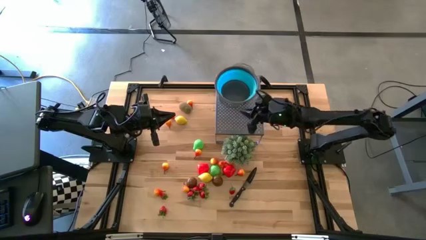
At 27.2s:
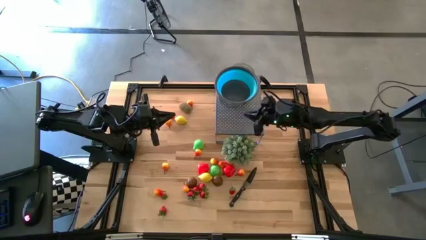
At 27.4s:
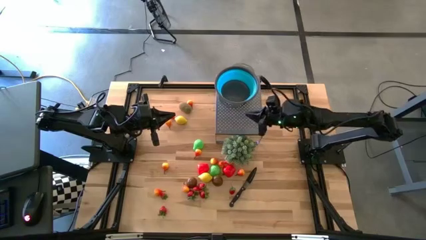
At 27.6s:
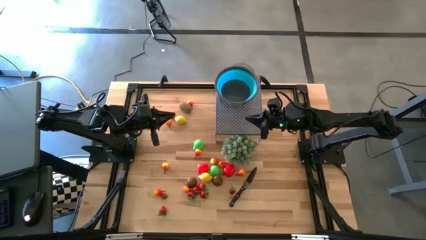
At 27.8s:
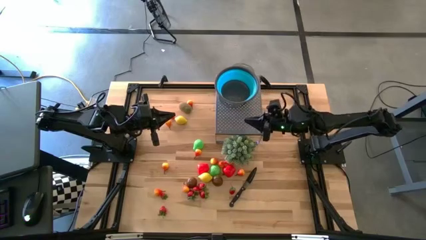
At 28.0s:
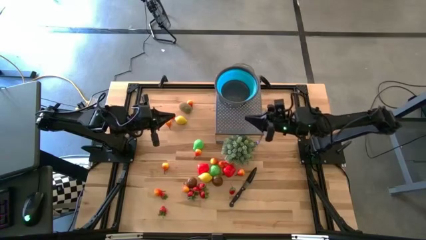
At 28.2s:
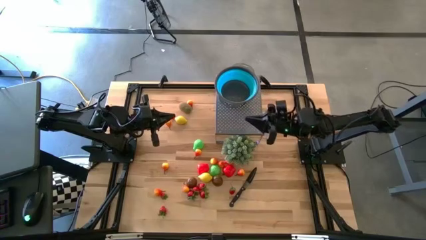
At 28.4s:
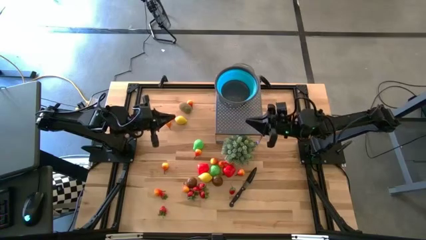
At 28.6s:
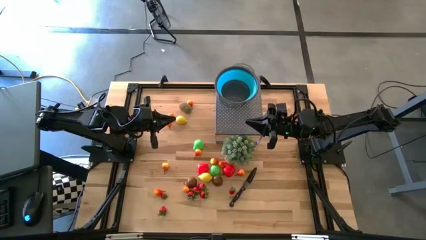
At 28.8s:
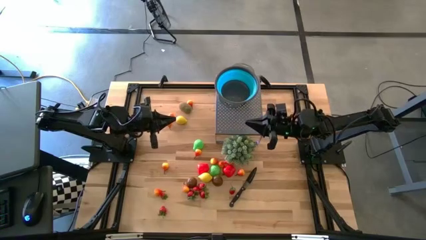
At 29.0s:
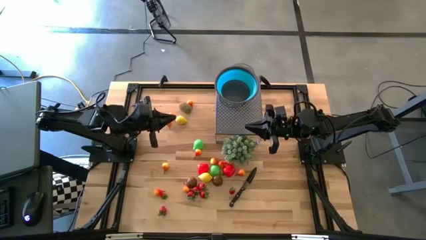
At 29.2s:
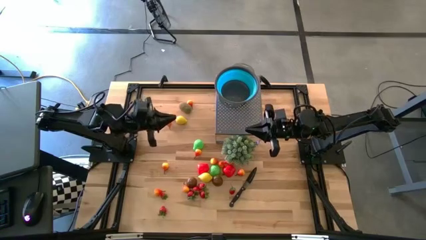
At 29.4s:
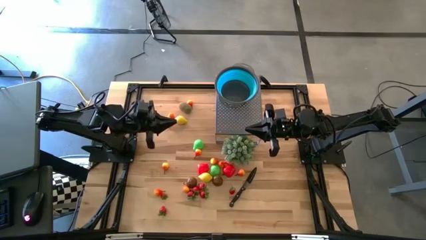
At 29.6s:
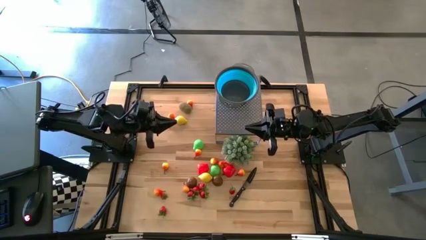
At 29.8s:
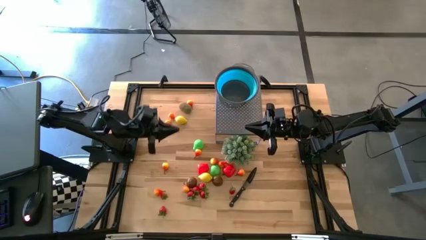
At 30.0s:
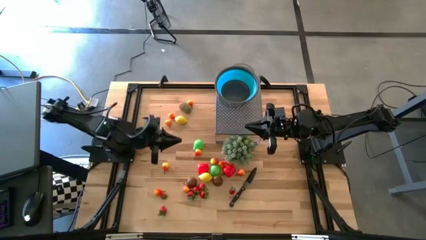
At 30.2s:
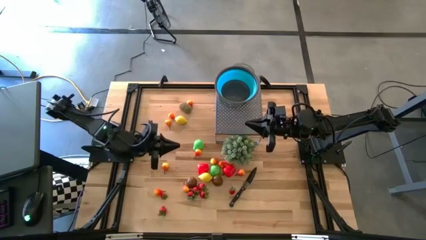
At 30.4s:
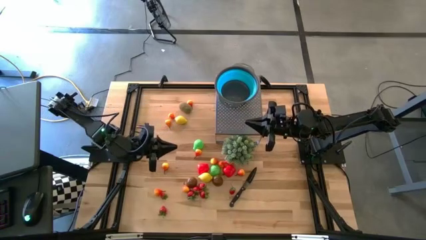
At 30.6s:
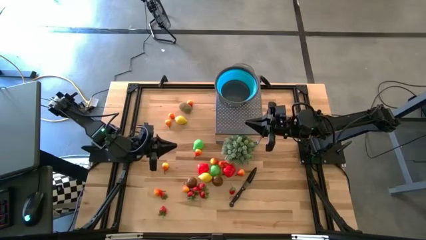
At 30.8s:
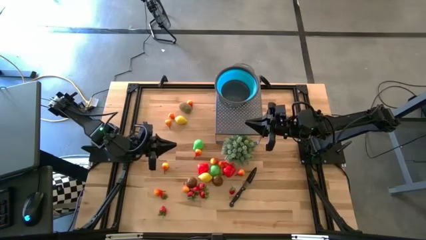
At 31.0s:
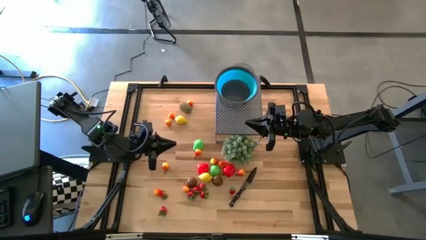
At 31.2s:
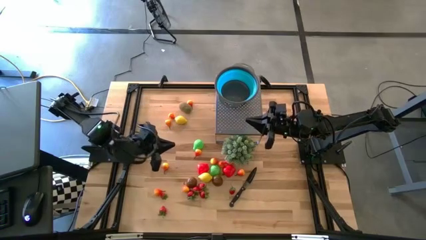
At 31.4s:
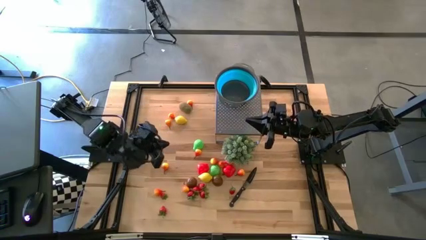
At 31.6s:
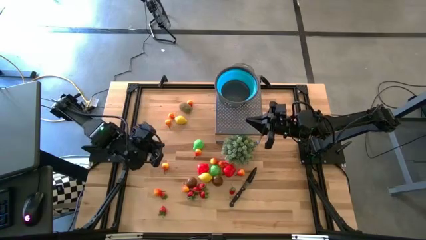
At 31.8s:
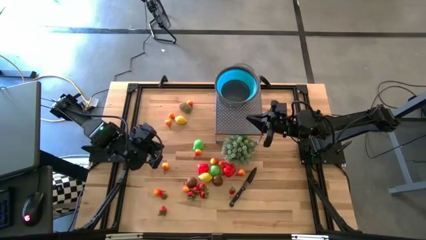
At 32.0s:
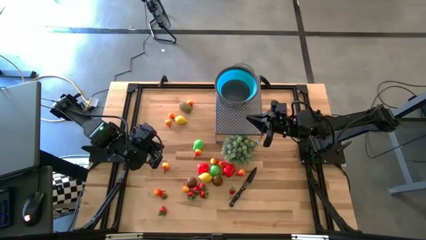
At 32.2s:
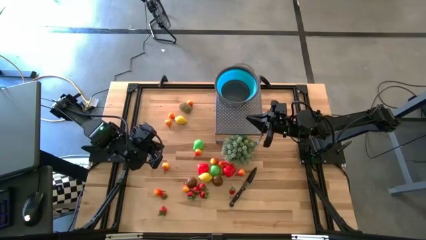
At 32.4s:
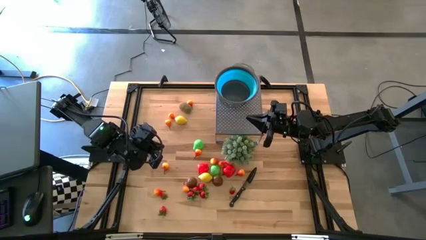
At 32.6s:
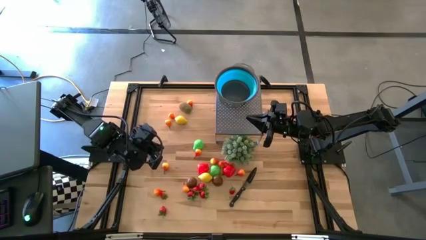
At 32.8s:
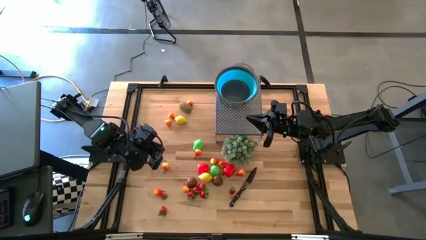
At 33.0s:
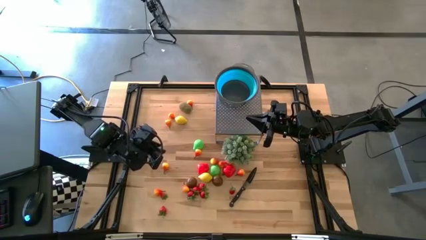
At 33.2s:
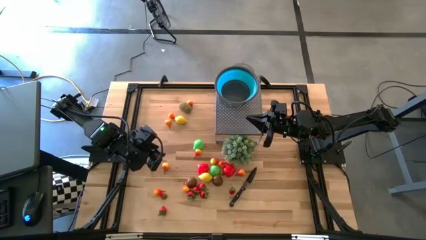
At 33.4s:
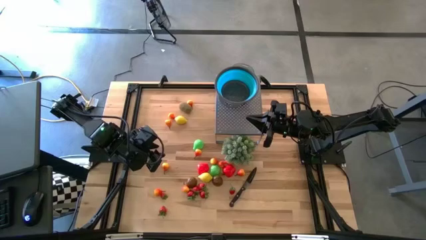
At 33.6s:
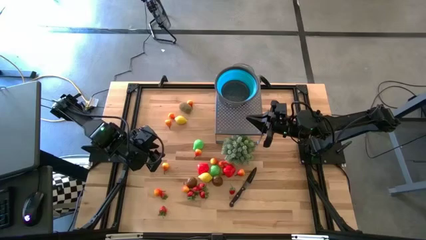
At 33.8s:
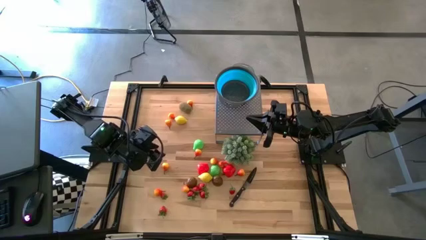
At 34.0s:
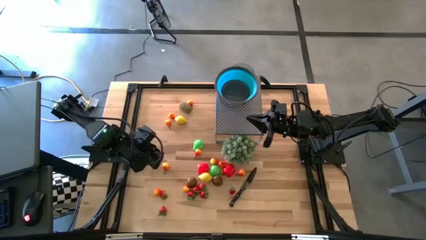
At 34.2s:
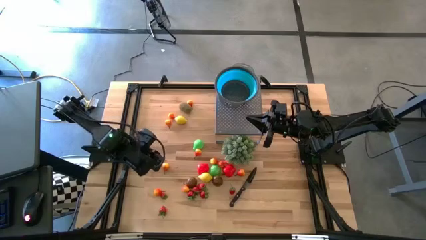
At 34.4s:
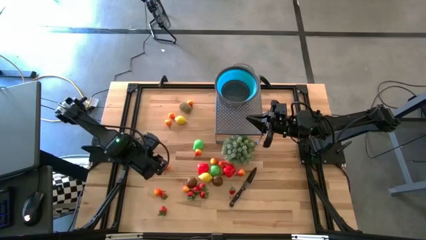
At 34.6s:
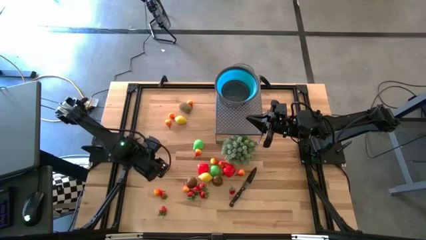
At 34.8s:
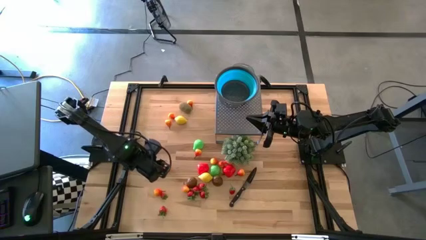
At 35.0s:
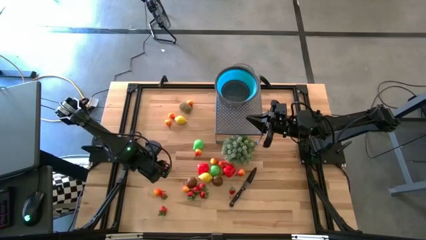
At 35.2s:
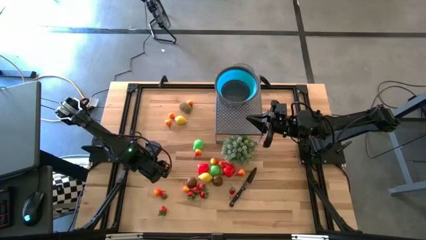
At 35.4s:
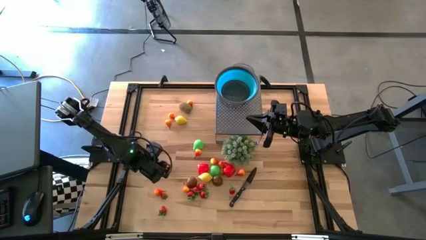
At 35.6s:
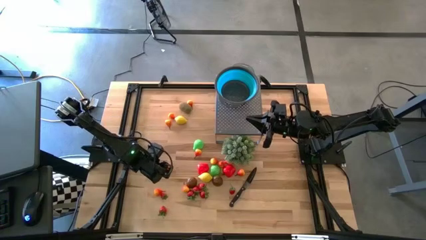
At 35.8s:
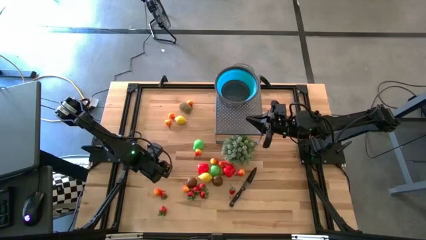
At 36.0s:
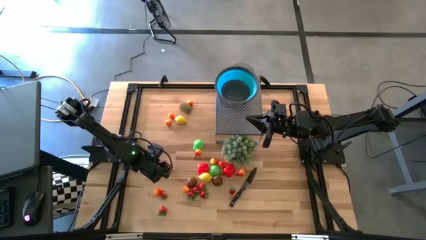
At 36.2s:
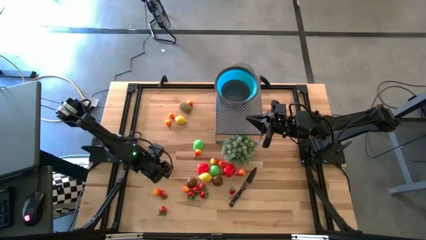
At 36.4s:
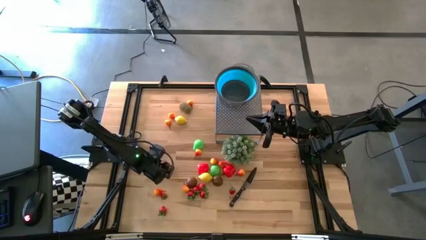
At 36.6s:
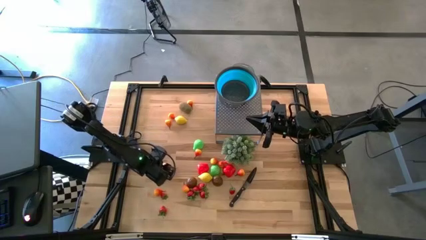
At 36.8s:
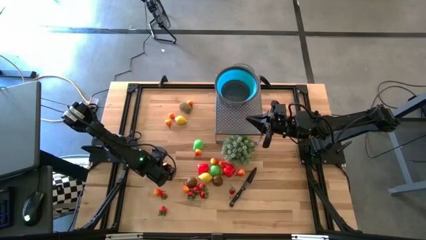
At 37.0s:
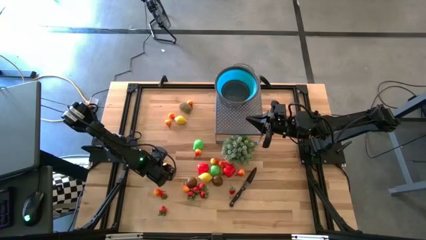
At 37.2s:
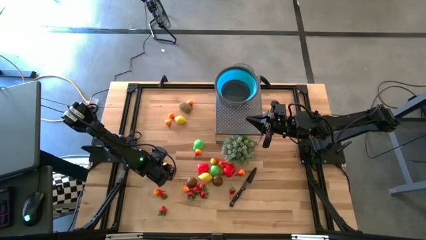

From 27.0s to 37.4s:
Task: Pick & Place Fruit
Put the orange pear into the blue strainer bowl

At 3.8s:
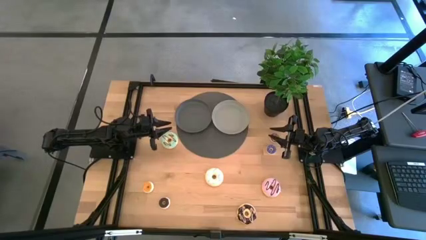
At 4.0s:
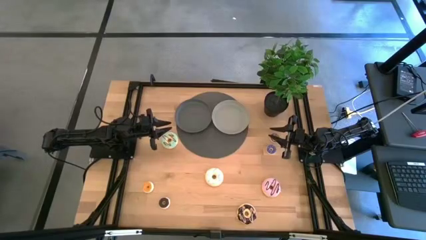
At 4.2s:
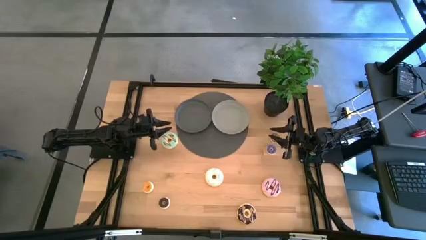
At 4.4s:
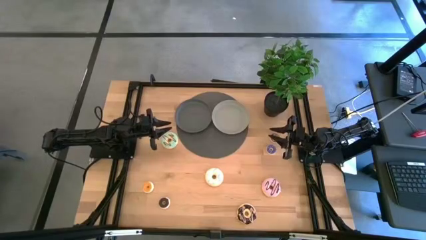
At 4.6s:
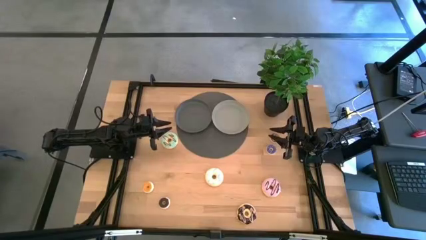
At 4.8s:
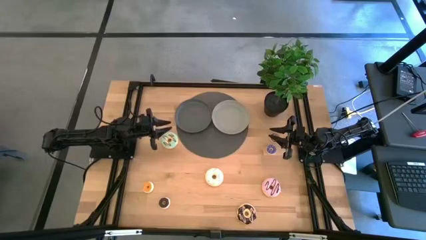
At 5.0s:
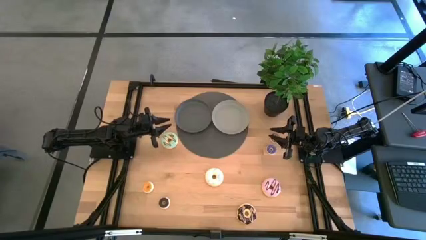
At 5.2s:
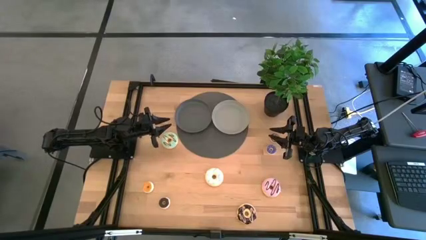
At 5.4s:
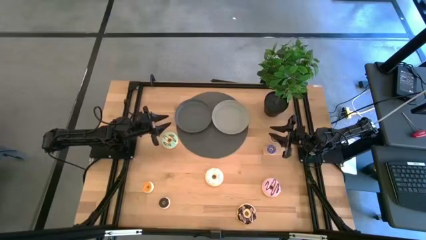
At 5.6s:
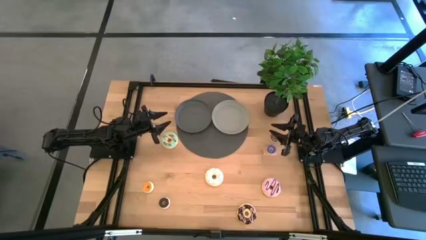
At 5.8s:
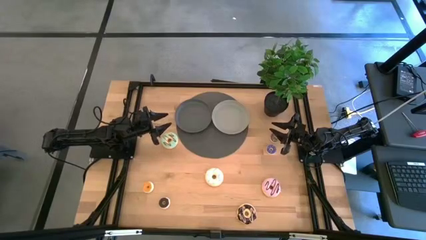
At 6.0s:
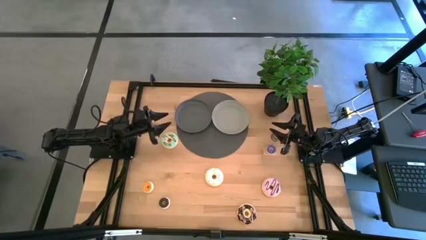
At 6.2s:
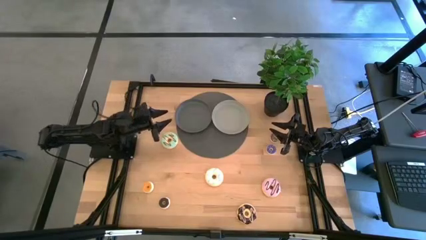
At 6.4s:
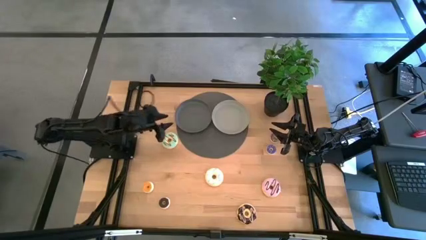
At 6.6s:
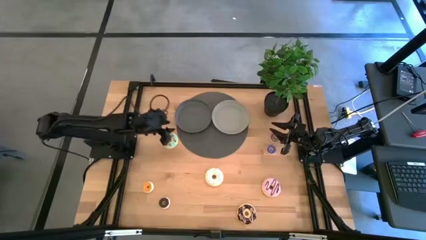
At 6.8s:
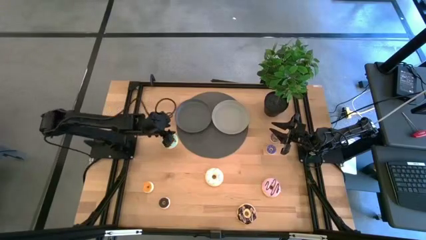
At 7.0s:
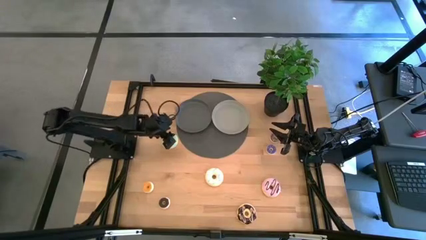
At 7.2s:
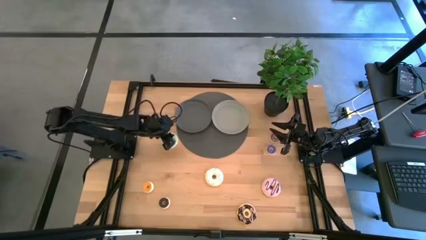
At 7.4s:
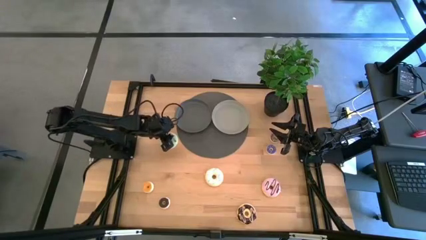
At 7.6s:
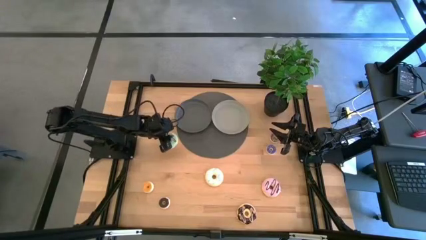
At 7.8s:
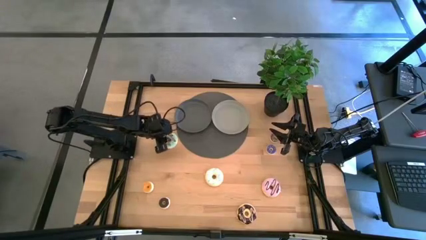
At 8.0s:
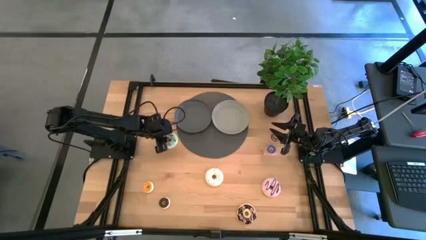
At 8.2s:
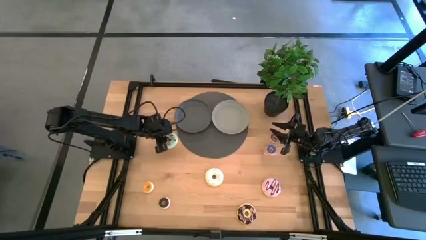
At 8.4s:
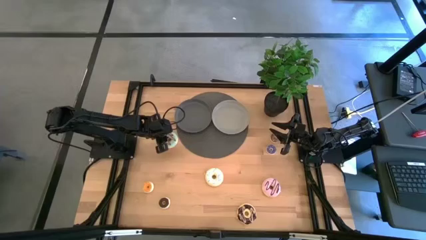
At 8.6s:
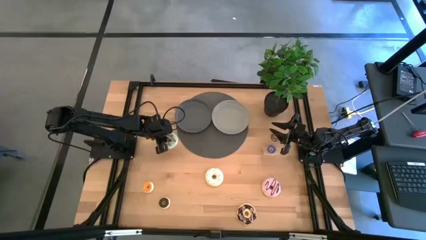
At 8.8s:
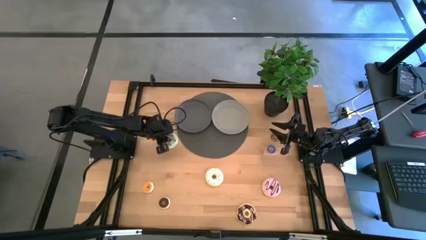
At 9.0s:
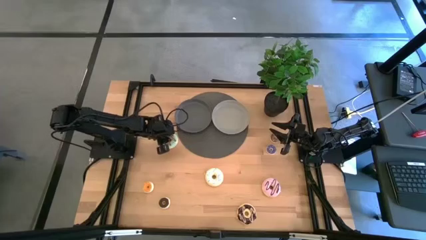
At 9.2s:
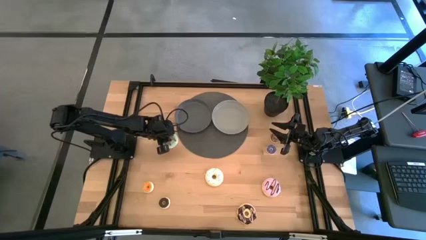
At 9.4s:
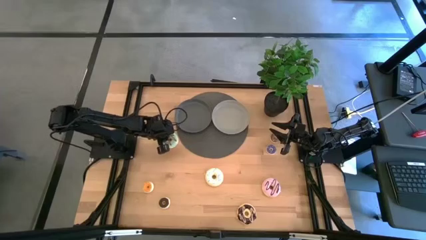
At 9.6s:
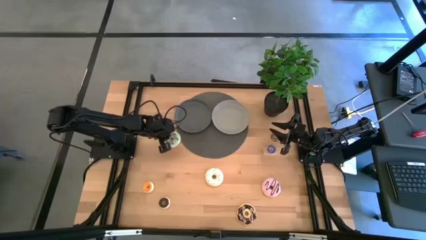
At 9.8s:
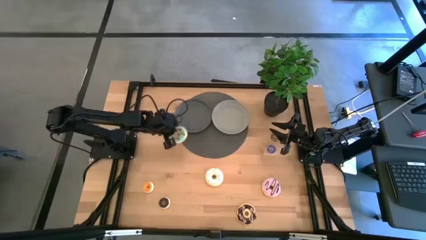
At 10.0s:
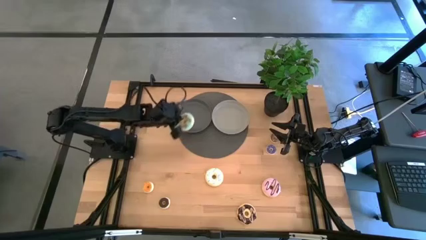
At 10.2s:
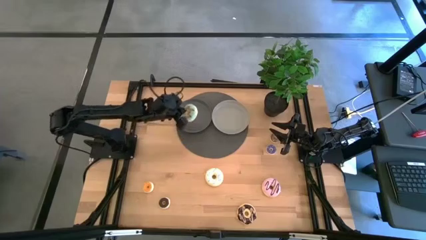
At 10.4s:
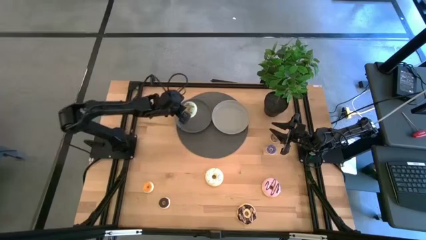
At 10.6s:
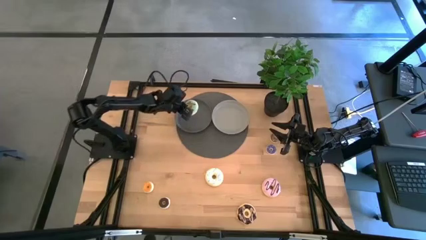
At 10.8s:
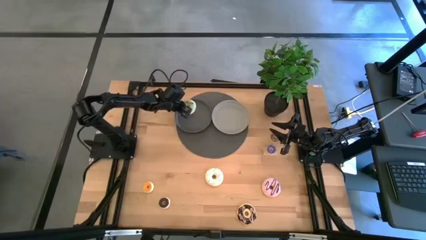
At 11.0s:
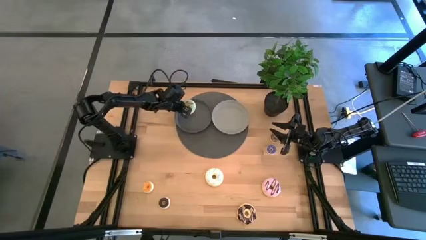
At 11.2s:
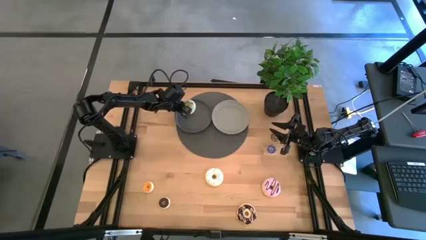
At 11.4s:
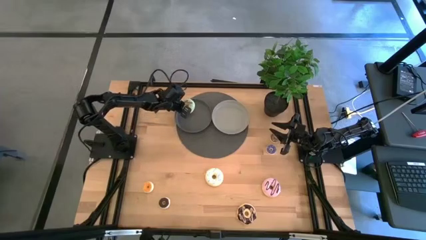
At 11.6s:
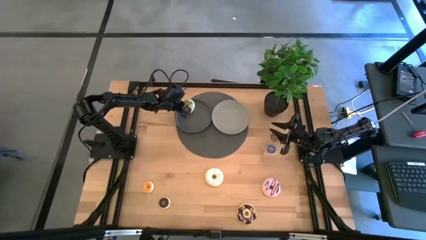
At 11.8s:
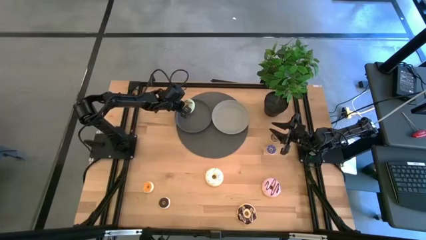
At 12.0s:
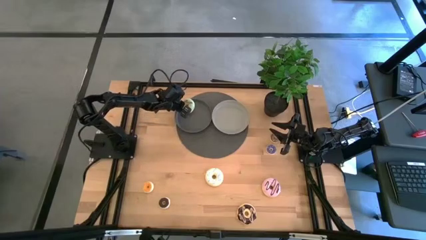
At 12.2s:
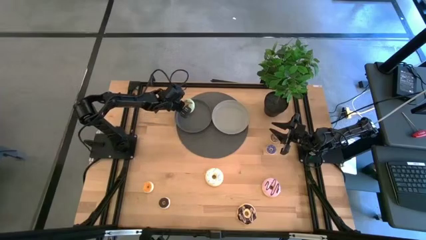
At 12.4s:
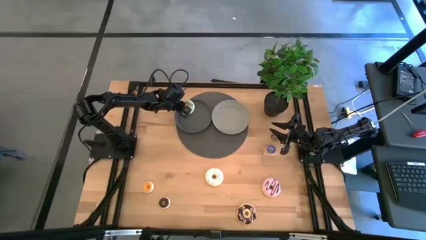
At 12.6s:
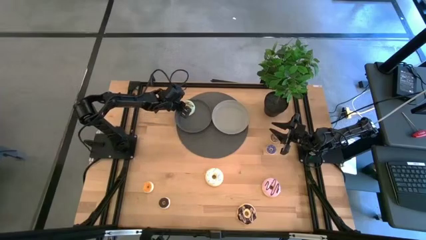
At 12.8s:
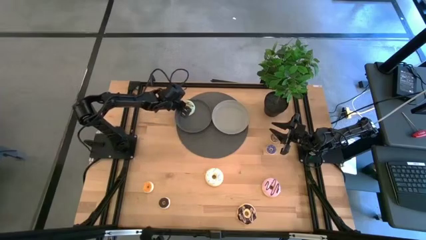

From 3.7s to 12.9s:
Task: Pick & Place donuts
Put the big blue donut on the black plate
